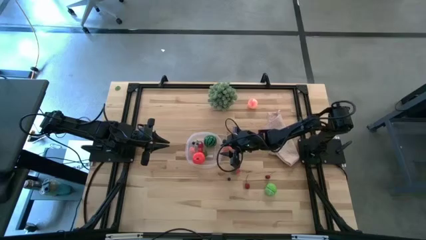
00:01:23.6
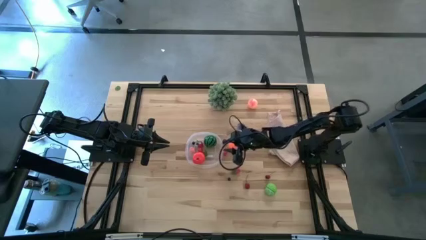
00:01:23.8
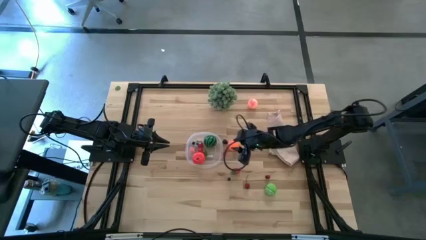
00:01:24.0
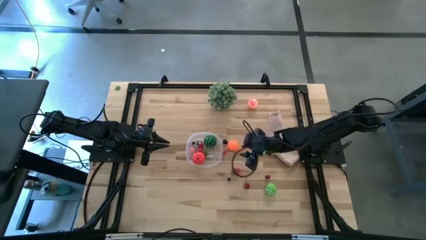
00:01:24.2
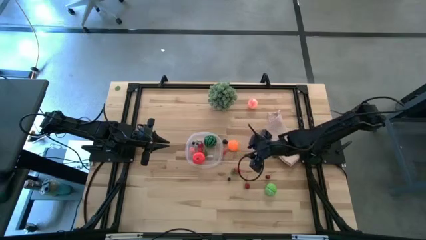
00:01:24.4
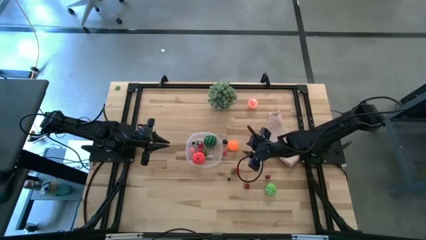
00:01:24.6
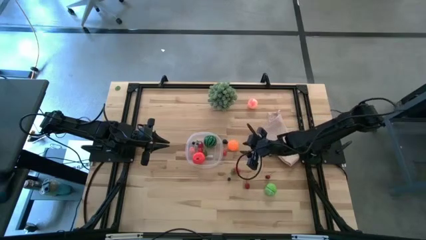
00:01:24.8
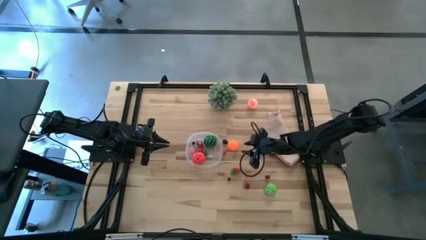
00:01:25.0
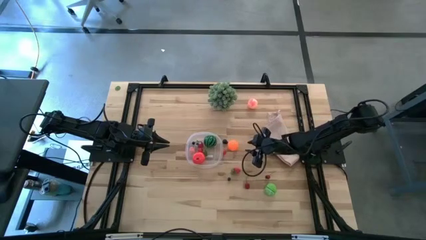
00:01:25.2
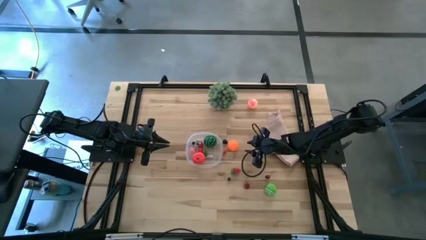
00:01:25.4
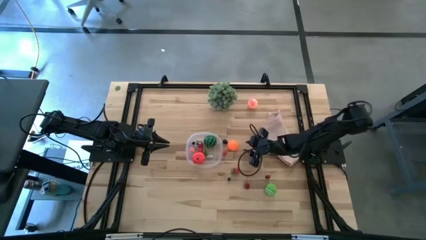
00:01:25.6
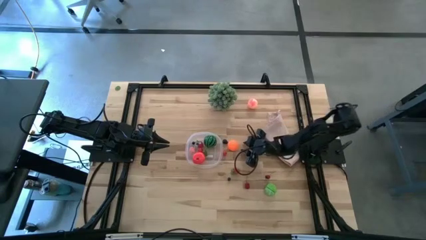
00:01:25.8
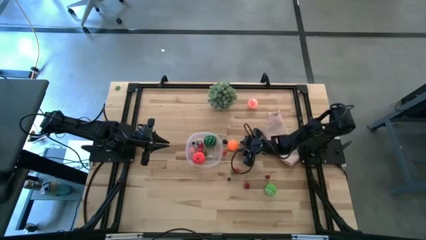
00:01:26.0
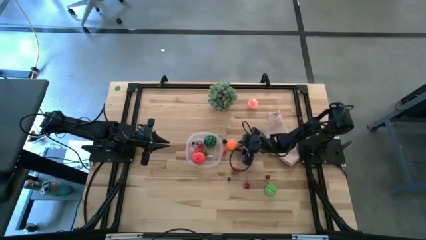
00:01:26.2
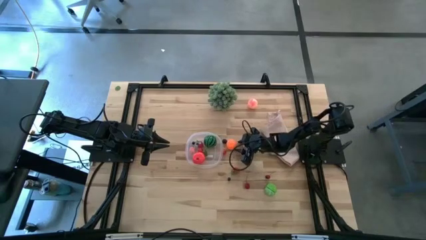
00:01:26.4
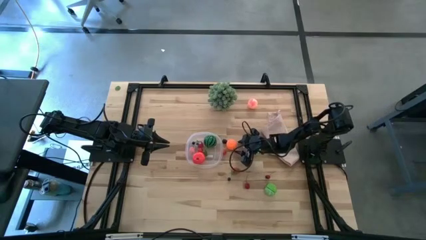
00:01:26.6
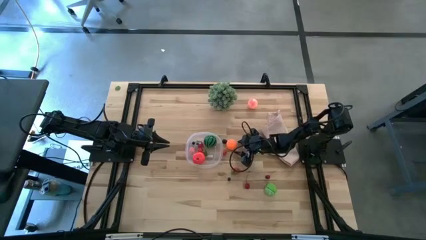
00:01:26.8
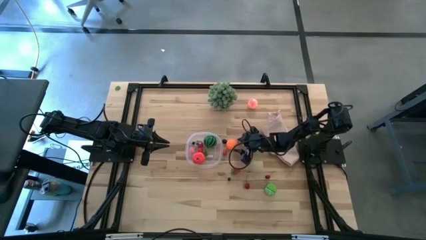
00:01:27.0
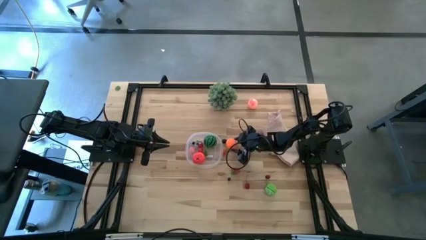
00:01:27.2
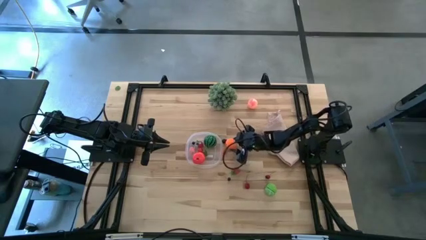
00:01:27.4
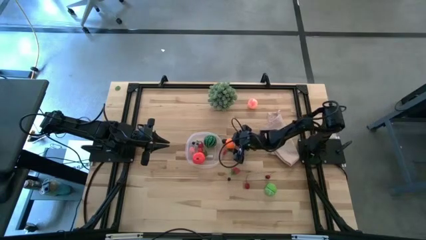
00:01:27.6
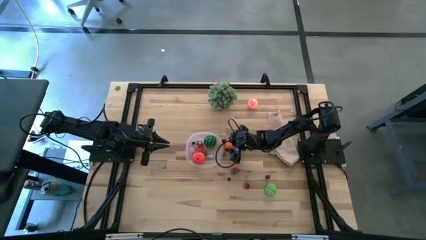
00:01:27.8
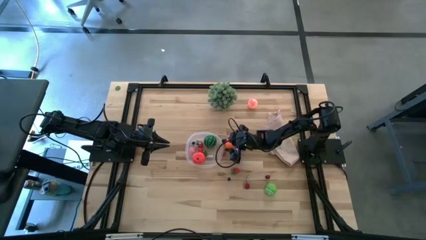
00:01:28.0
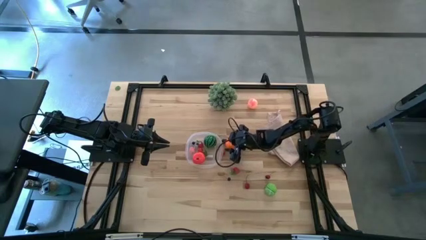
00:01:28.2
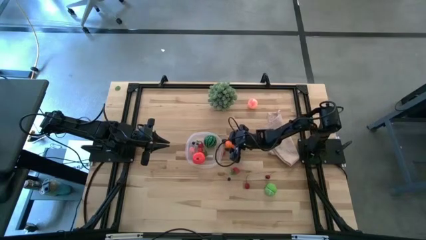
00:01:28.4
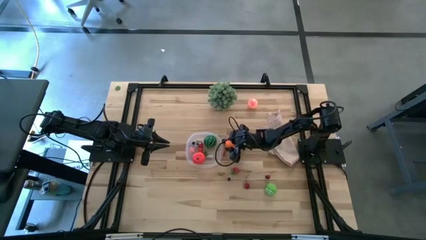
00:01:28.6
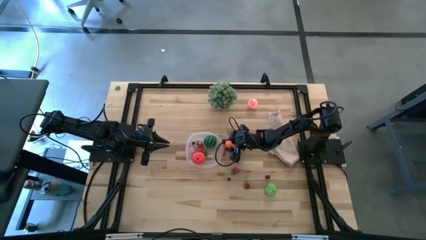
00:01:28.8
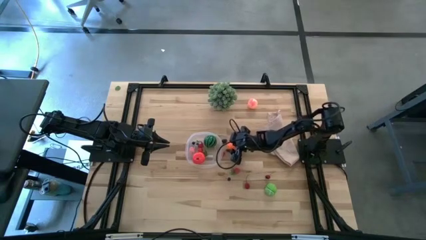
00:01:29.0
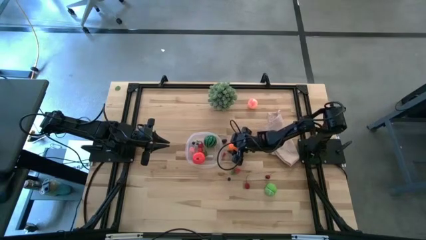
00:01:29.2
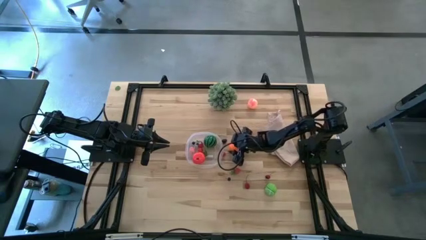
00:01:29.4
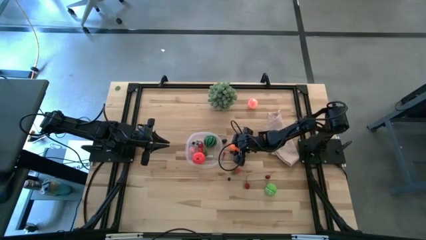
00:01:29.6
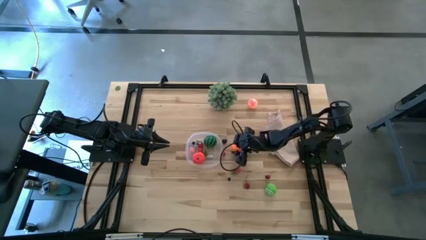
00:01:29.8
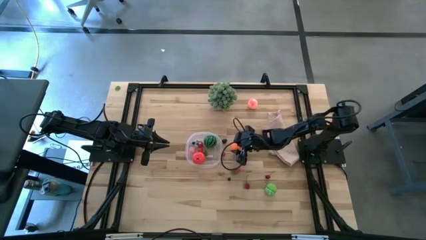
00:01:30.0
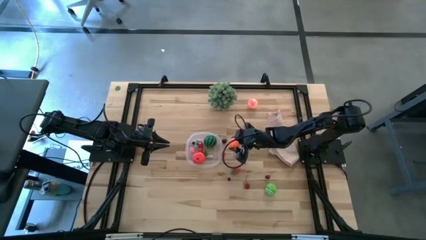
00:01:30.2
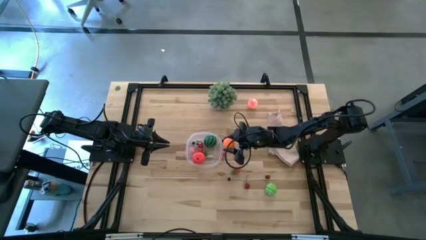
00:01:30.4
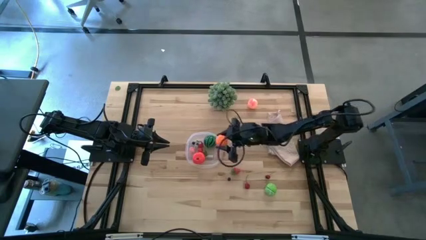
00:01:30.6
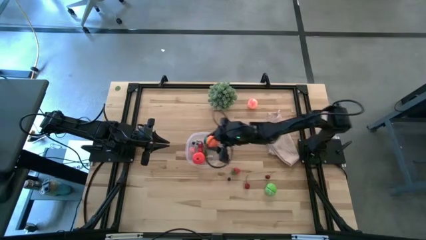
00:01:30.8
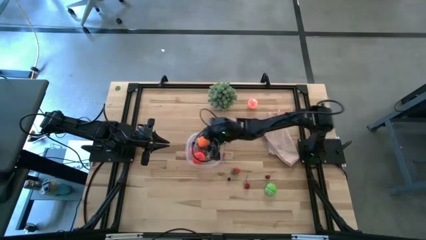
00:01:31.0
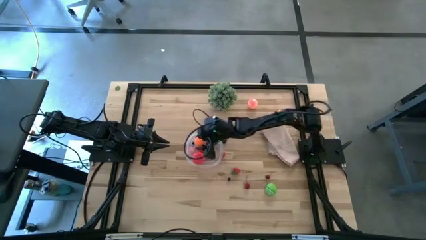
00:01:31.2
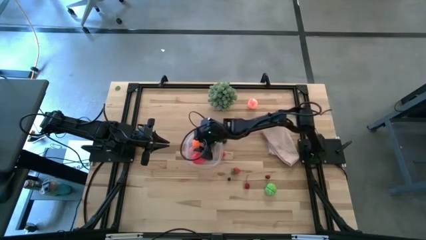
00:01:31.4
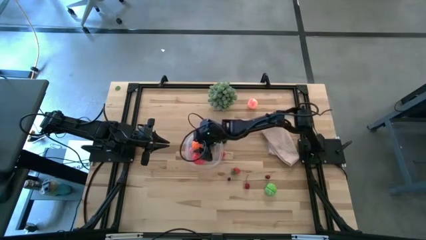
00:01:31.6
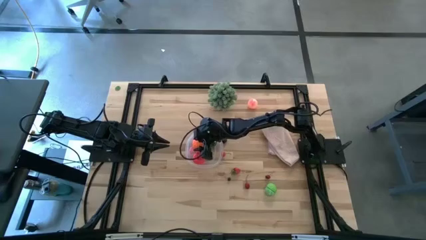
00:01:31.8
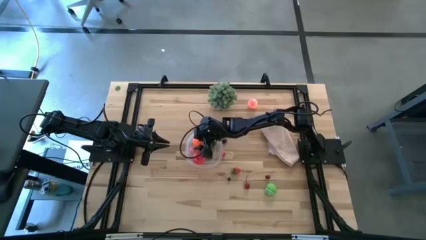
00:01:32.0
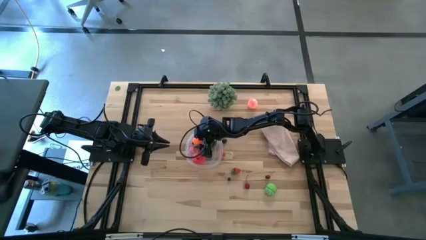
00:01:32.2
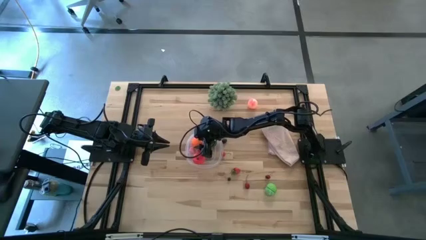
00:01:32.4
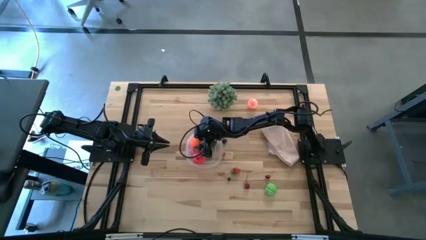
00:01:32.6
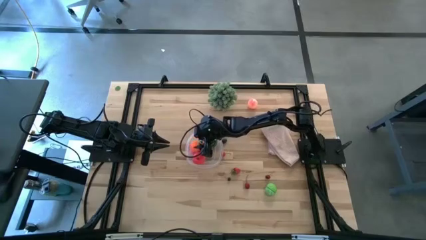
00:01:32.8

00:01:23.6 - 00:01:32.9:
Task: Pick and placing Produce into tupperware
Put the orange pumpkin into the transparent bin

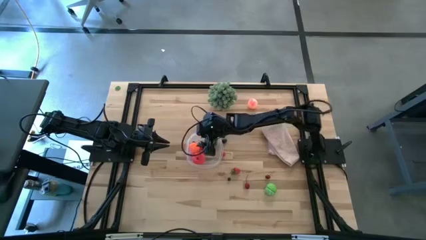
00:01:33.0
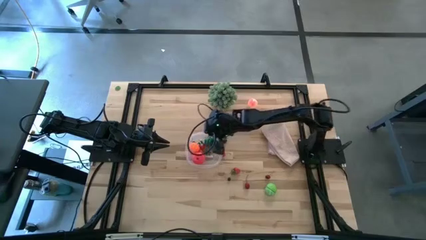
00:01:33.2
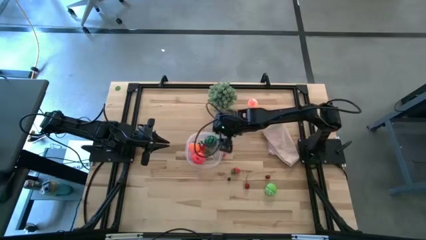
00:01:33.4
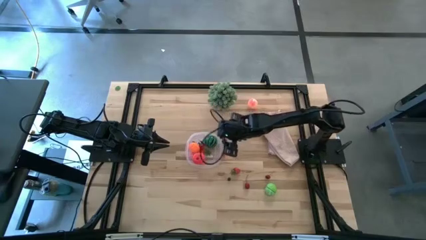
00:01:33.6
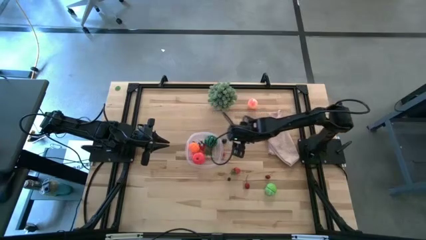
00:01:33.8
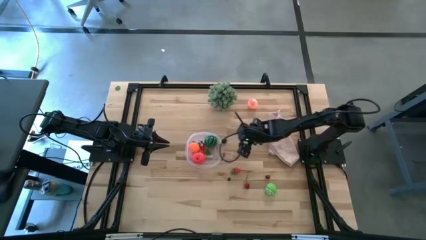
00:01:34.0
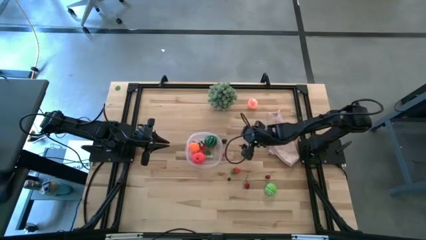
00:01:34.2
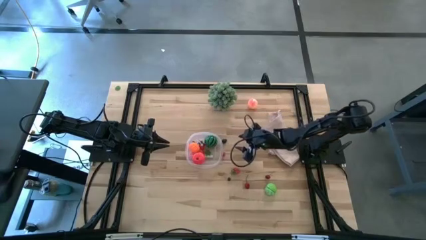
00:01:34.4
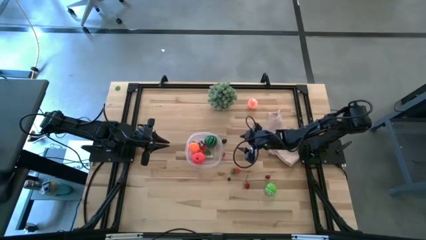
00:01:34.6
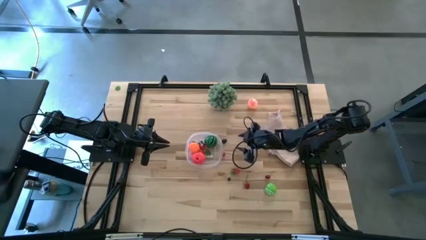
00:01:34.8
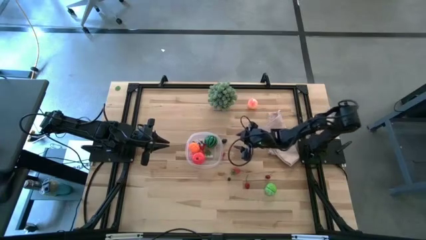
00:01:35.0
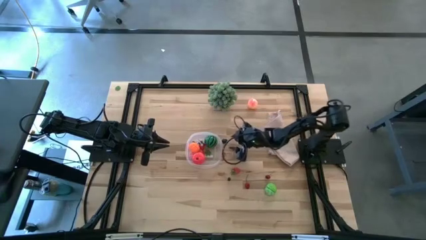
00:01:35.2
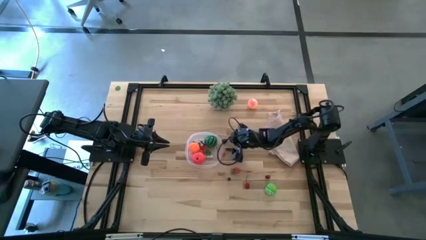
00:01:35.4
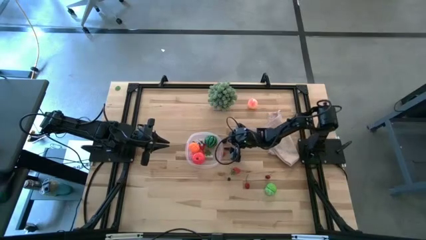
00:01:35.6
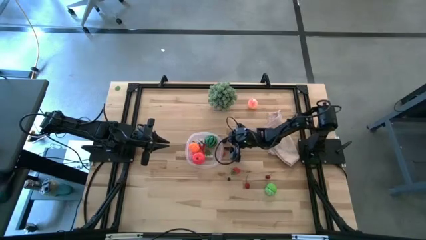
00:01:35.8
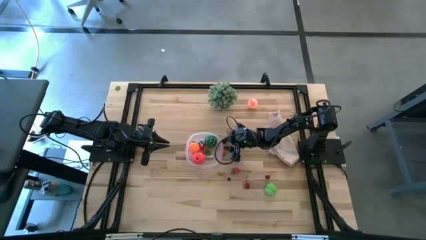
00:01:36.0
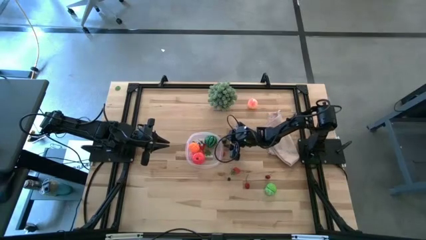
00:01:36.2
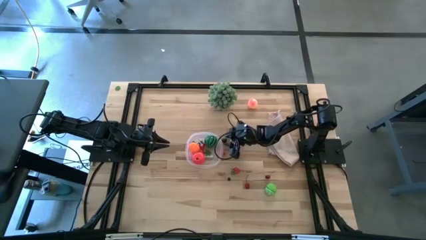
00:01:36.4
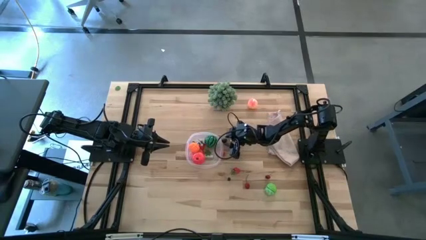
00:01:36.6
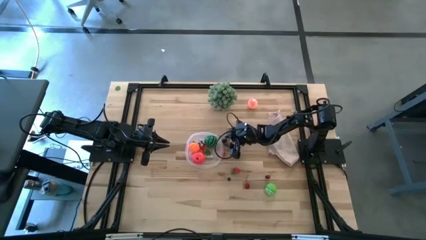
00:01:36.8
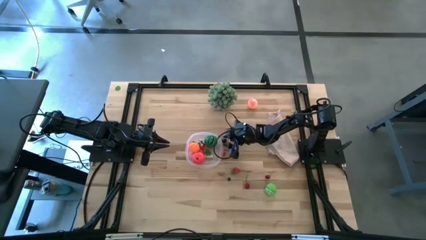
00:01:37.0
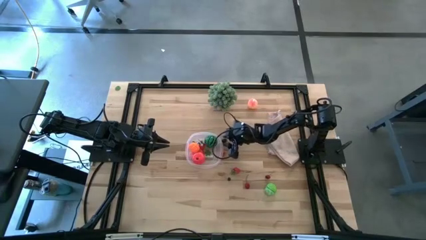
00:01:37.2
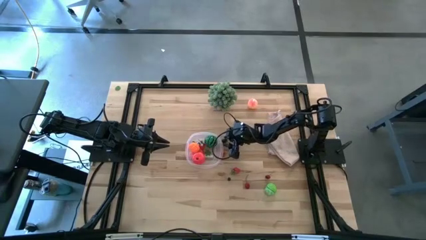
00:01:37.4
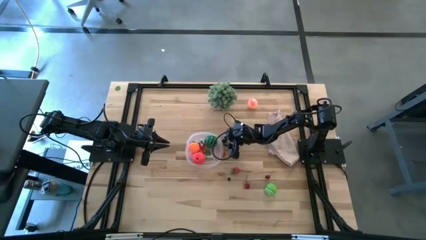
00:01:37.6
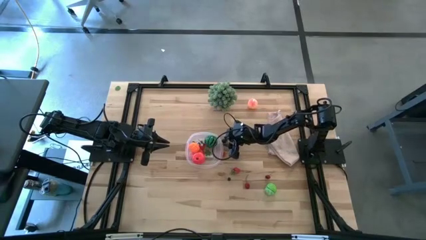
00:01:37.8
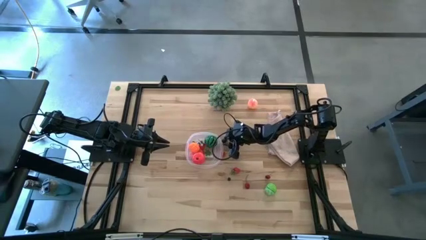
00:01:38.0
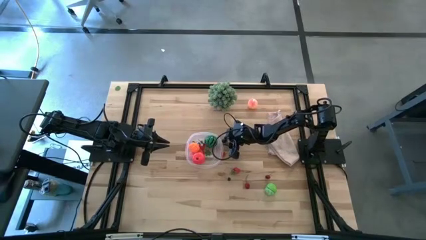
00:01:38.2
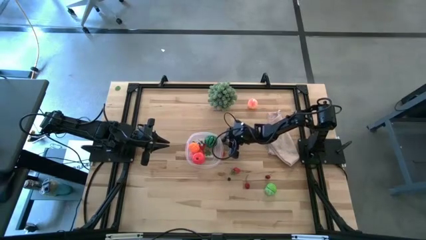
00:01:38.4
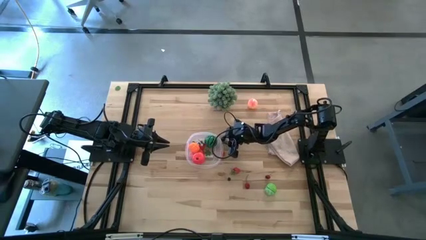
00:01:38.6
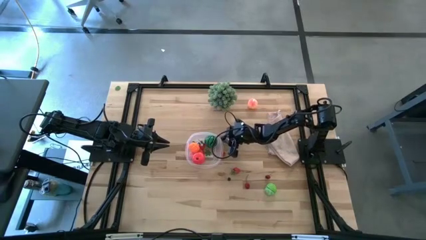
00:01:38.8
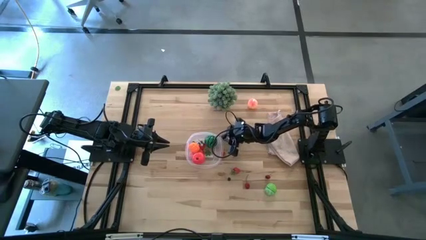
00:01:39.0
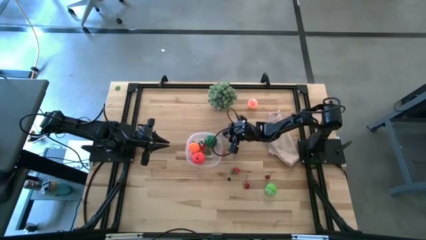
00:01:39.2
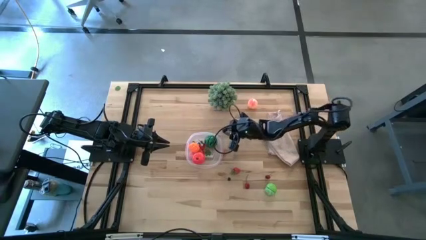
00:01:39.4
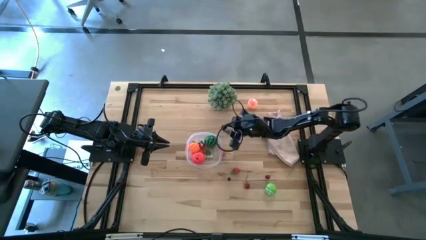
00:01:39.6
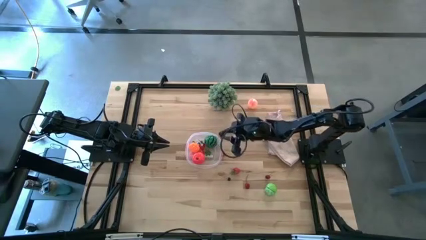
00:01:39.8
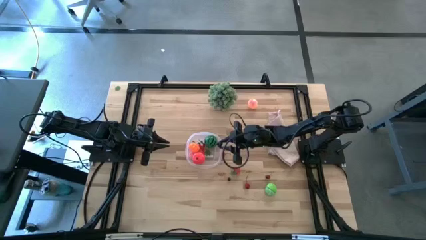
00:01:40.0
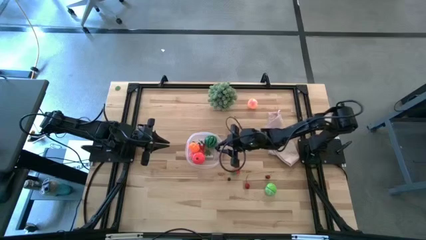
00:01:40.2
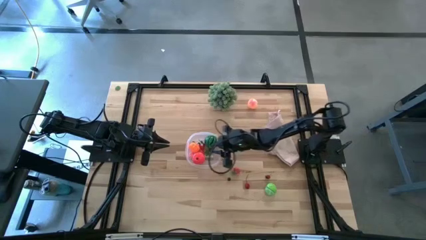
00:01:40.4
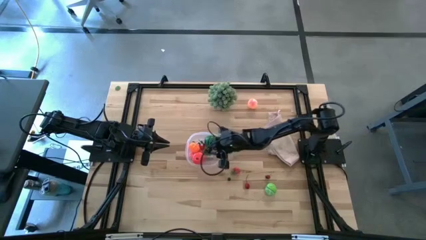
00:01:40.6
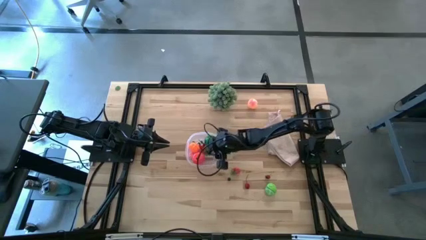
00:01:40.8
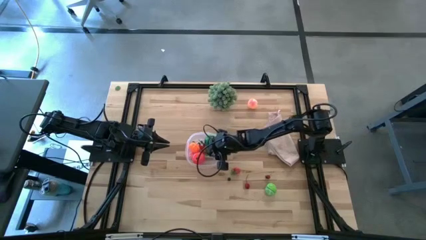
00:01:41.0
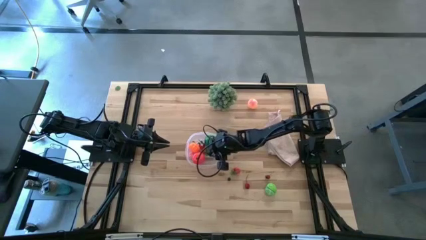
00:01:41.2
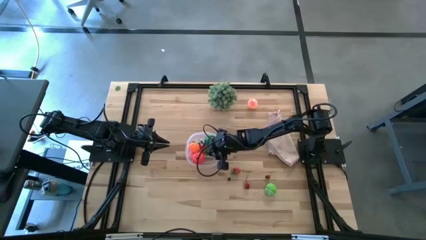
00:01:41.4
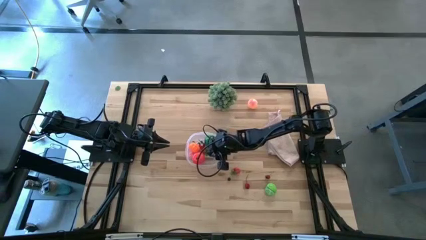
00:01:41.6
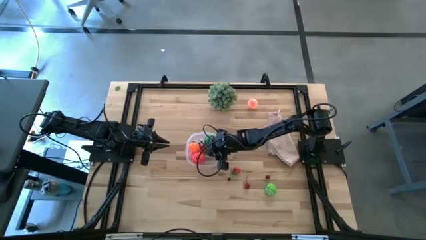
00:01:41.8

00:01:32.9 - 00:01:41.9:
Put the blackberry into the transparent bin
